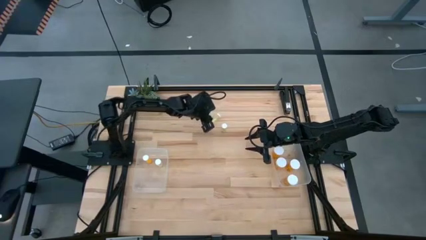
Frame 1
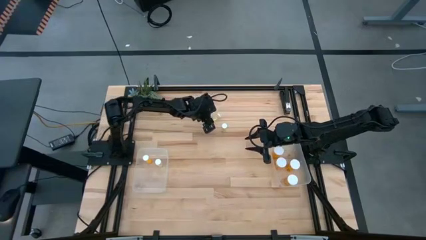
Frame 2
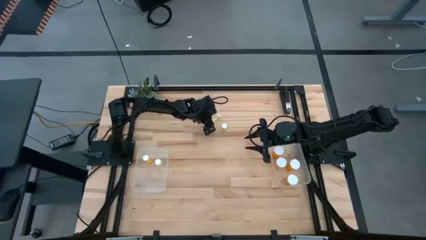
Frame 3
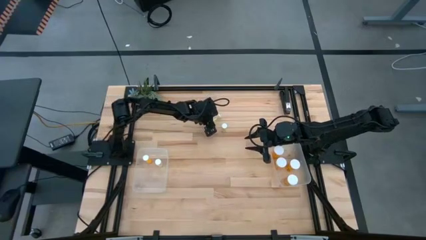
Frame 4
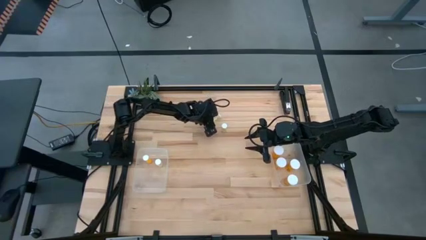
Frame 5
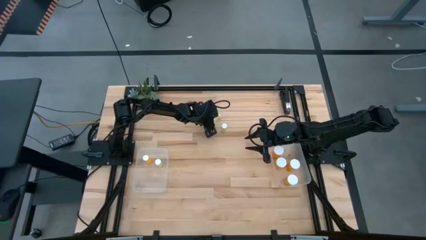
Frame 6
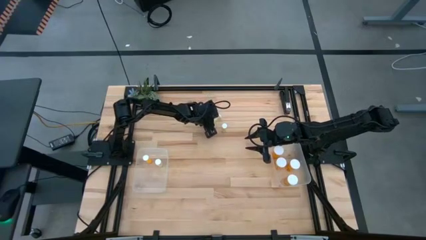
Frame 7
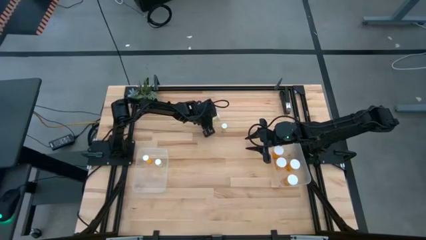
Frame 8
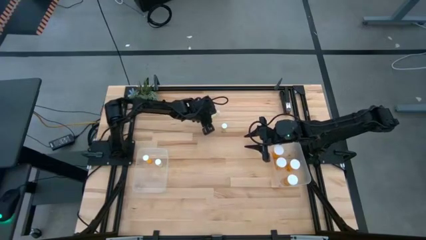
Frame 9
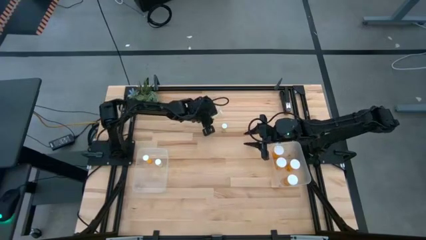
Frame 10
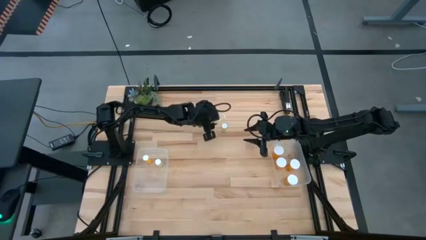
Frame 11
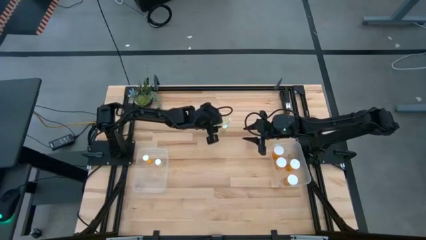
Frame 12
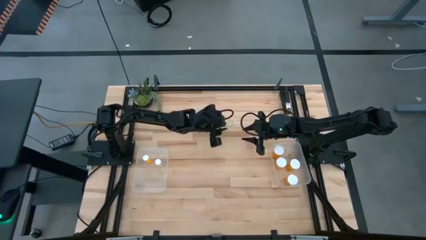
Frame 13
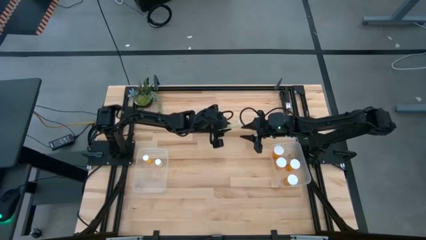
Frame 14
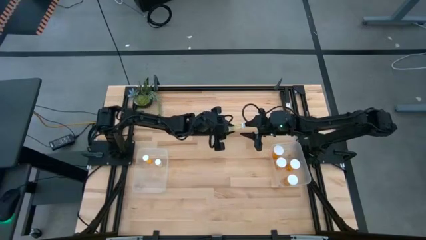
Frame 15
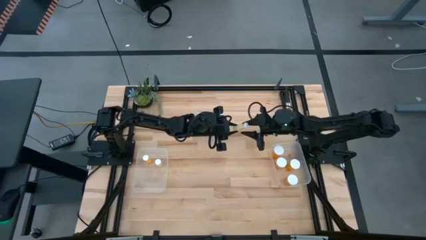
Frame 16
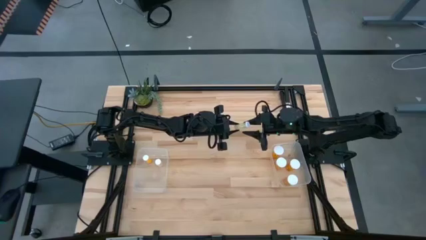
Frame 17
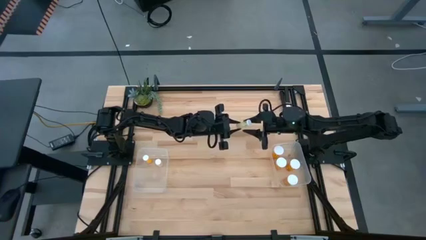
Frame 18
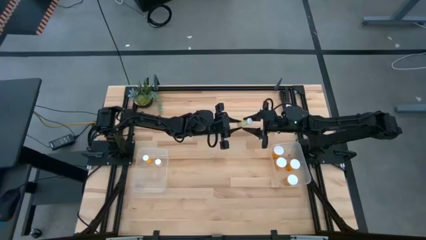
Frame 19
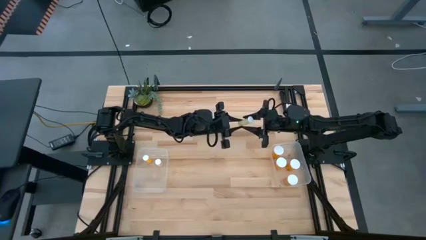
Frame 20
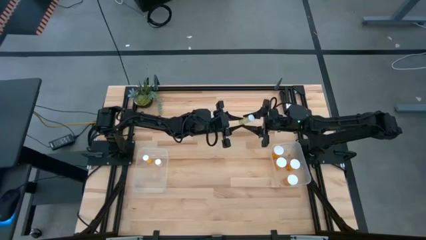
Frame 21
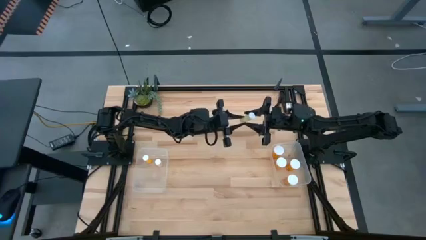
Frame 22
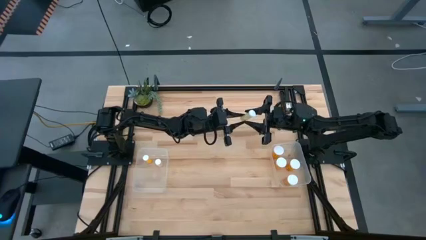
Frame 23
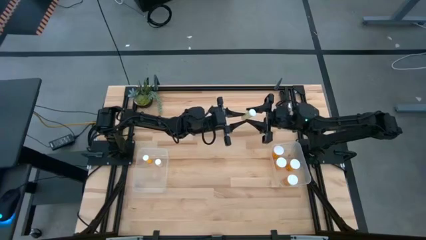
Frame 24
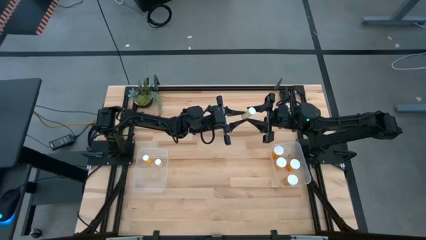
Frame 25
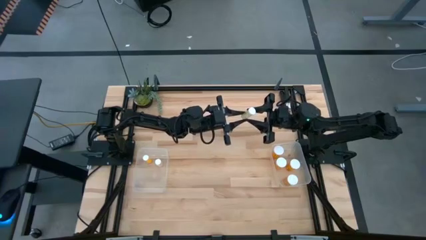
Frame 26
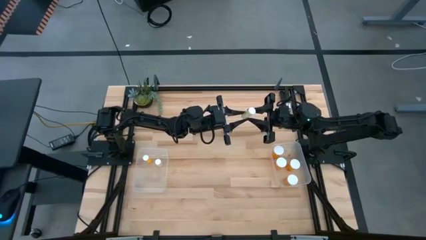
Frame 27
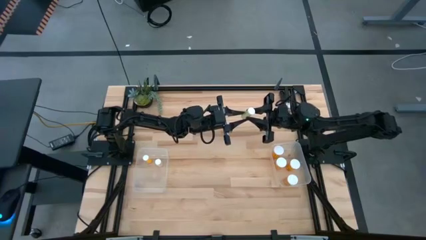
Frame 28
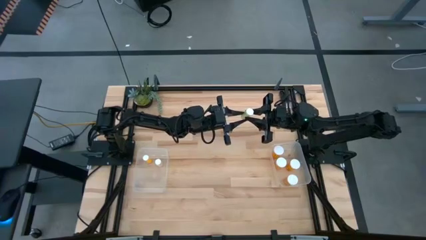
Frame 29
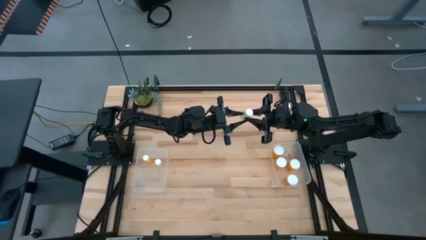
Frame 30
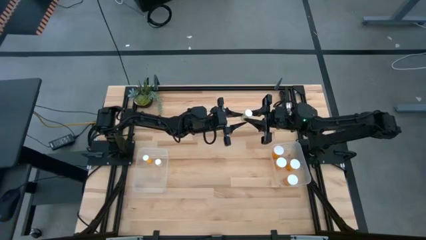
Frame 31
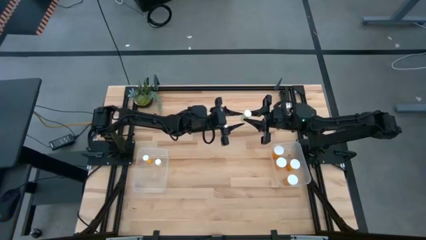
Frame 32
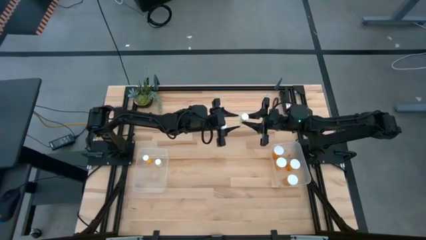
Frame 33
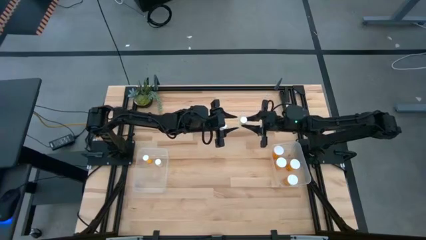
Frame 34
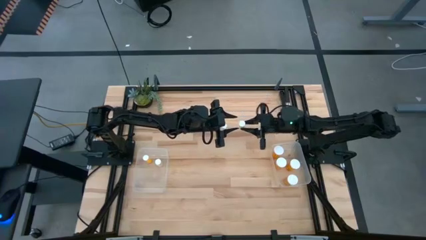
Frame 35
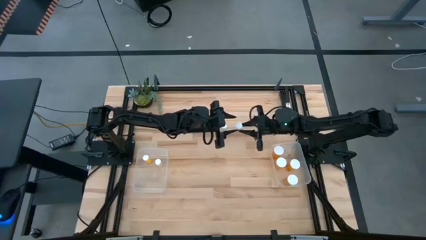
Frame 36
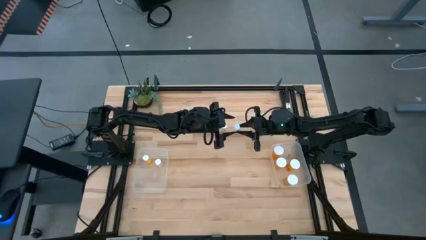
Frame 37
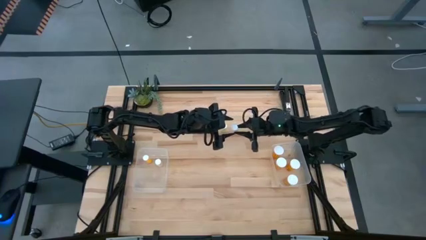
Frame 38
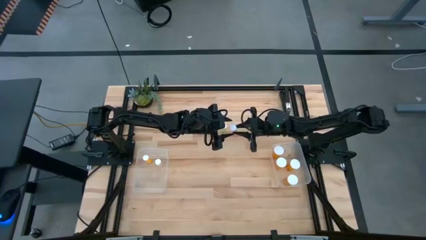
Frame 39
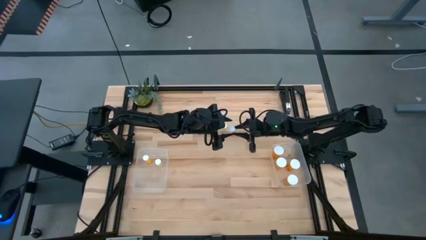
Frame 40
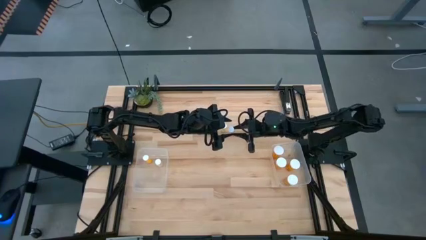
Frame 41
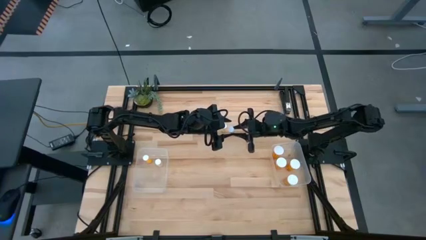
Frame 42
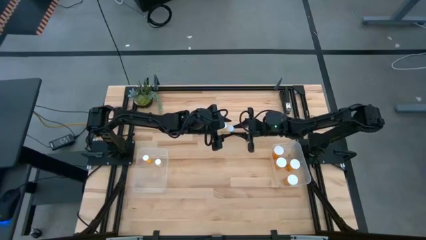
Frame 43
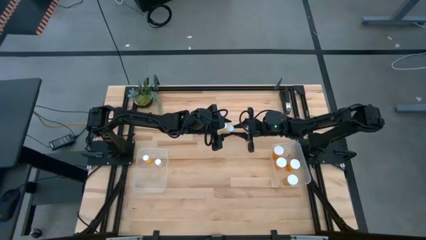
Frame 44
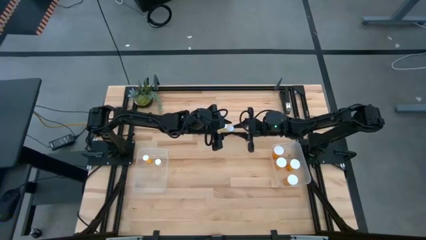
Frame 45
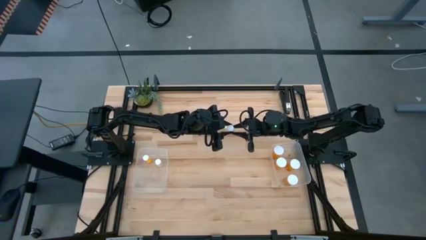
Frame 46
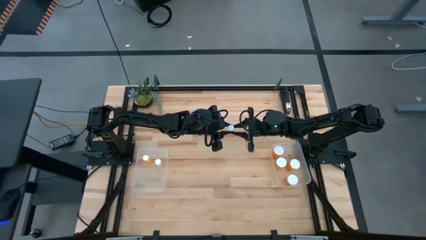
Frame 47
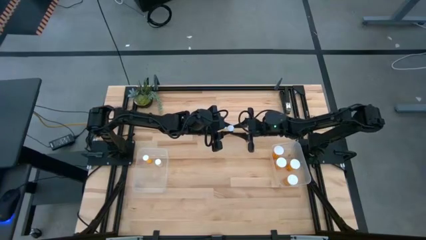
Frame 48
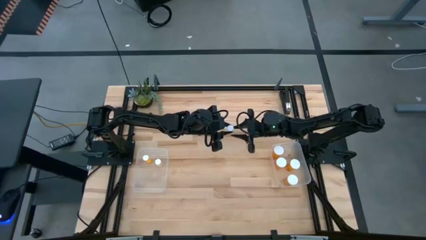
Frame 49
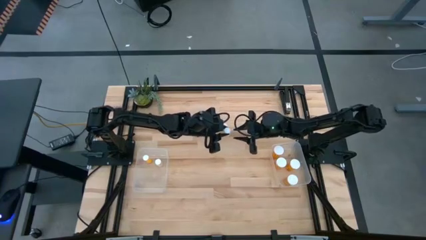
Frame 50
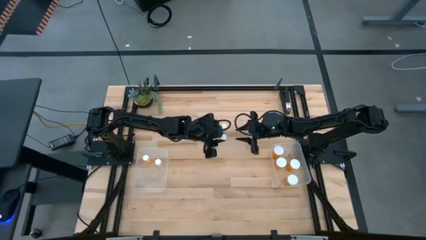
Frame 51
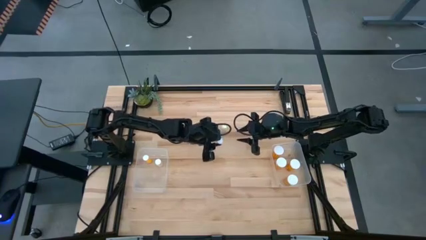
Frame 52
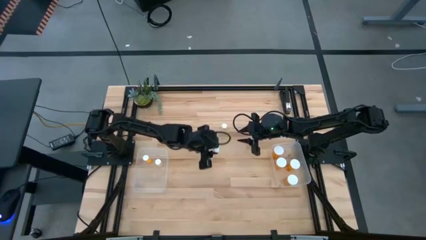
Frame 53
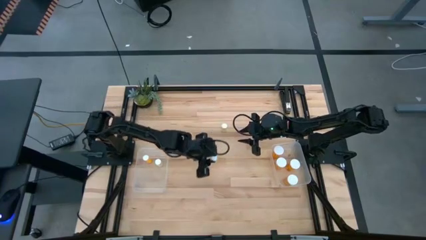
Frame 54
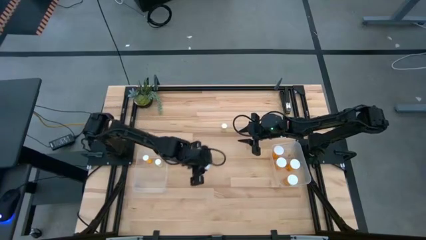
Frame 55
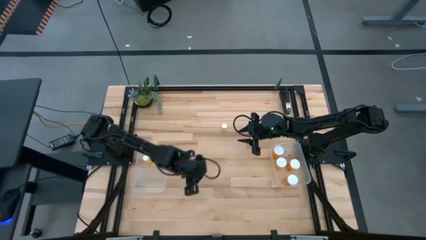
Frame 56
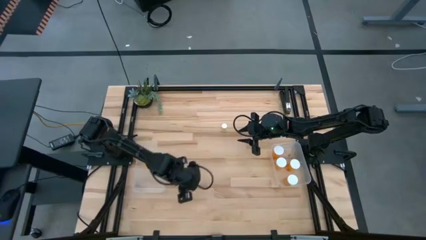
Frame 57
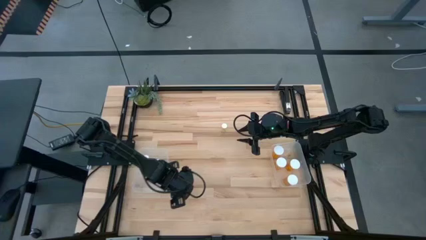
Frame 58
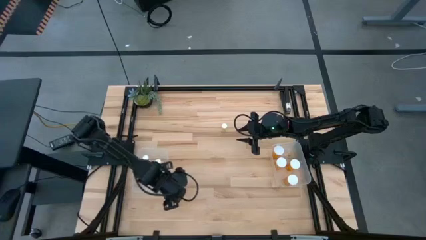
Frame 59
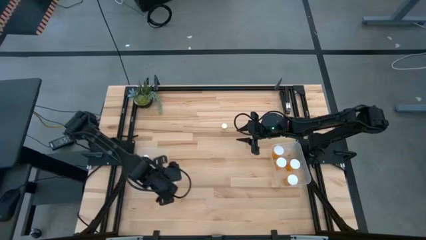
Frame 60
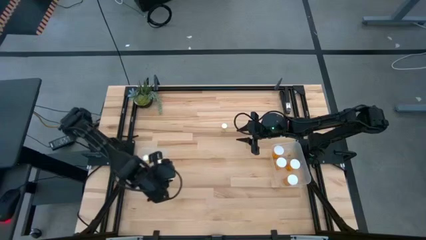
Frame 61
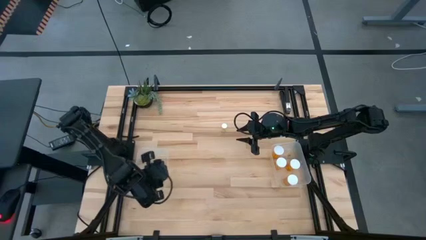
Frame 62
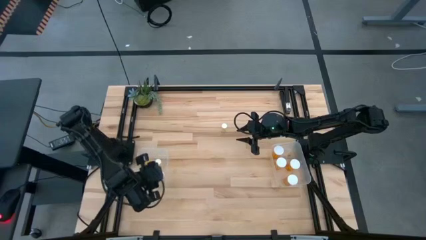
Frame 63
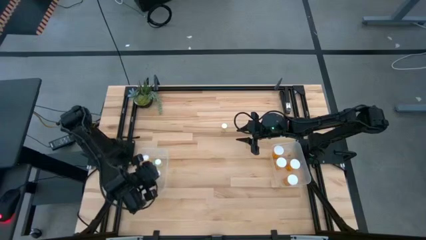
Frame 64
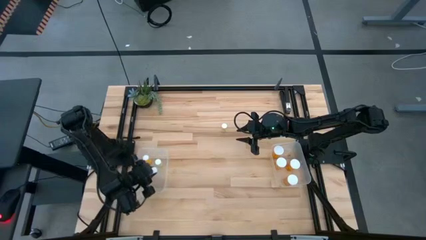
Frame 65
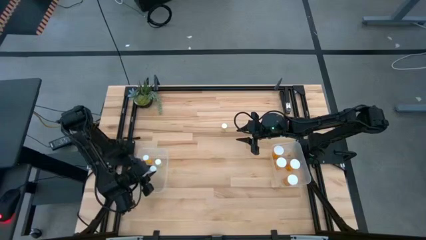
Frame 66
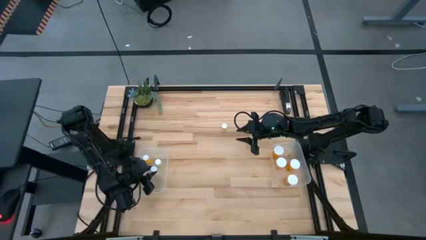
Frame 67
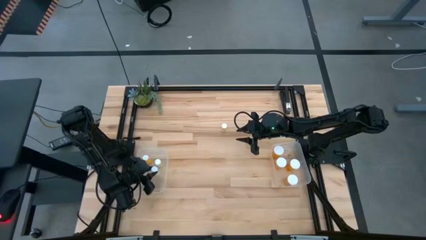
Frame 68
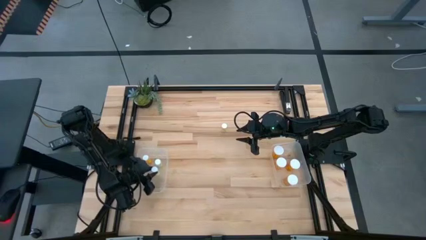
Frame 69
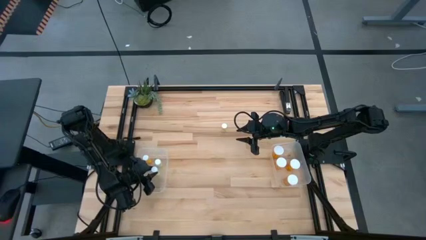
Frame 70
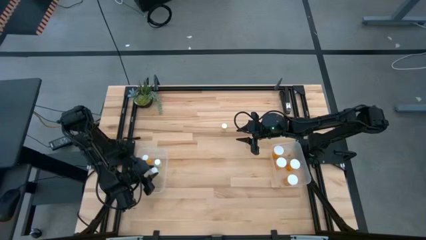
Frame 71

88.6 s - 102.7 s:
Task: Pick and place medicine bottles into bin by pill shape (circle, oval)
Put the small top light yellow pill bottle into the left transparent bin

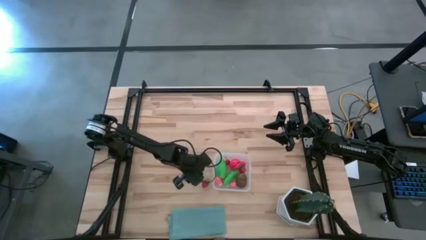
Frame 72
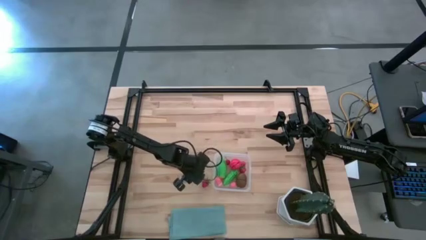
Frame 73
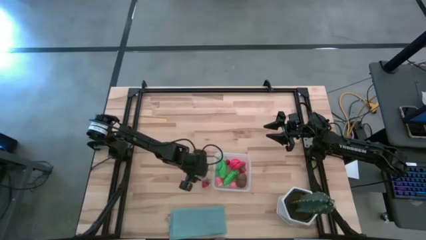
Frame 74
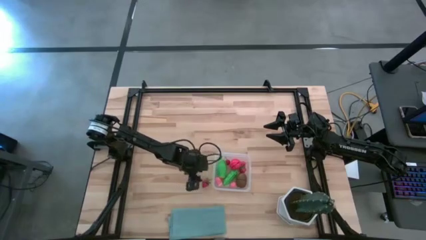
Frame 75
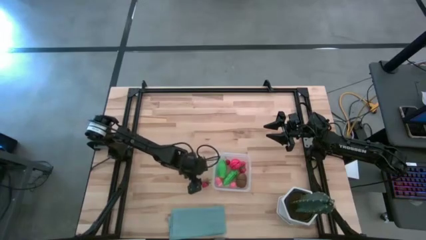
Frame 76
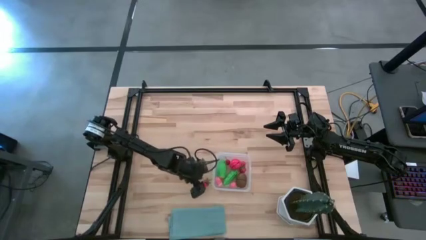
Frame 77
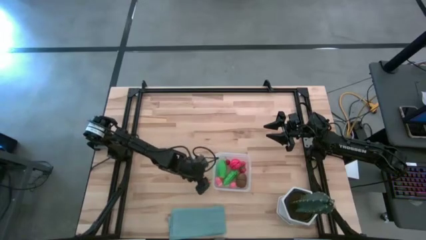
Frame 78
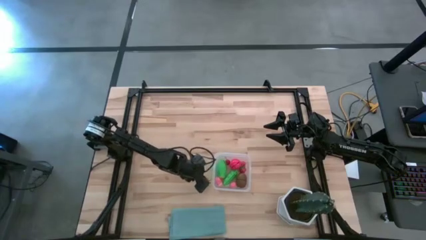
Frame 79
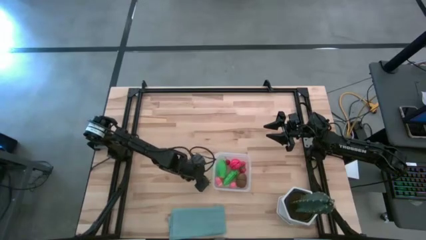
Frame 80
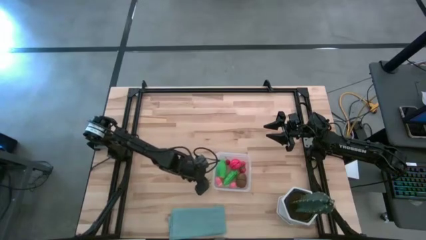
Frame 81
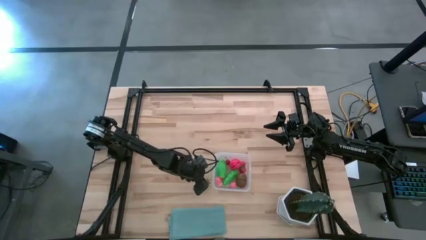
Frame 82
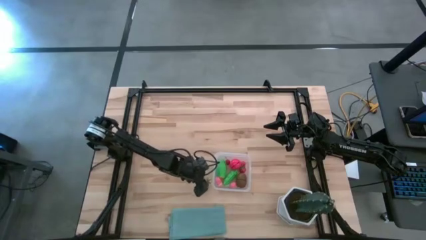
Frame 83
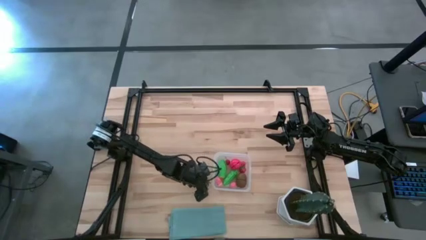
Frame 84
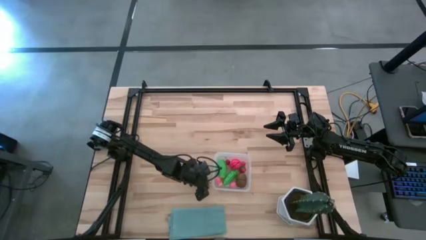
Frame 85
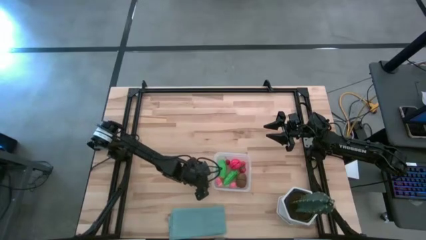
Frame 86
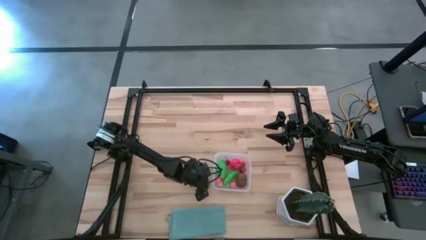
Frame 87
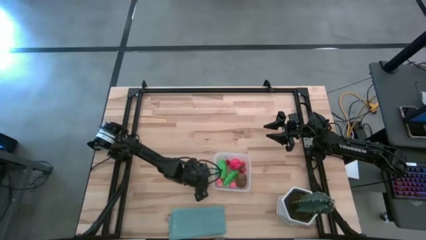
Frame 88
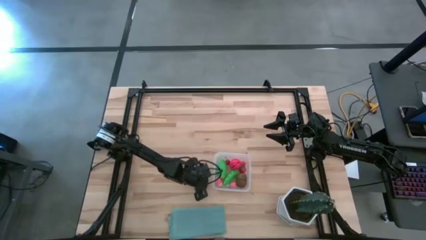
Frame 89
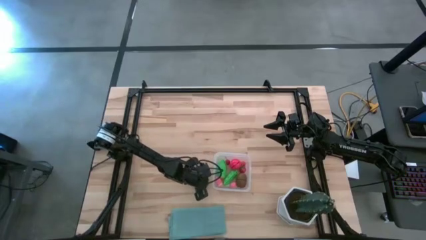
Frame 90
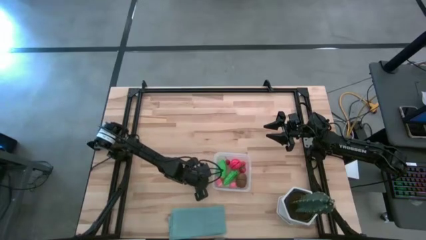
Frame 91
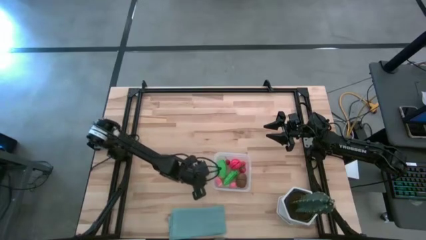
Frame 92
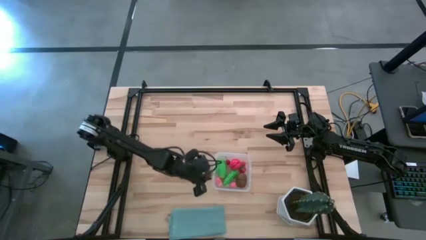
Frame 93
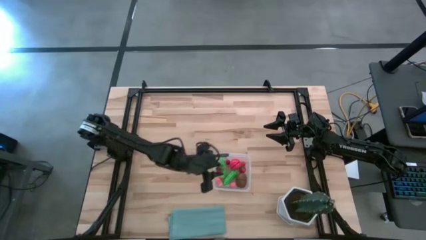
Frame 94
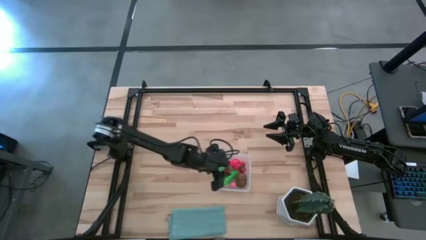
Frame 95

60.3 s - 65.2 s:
Task: Pick and placing Produce into tupperware
Put the strawberry into the transparent container
